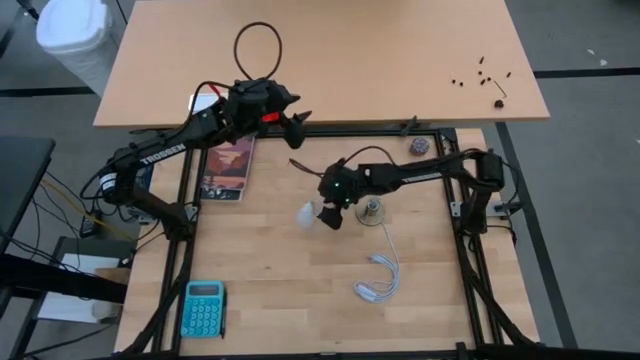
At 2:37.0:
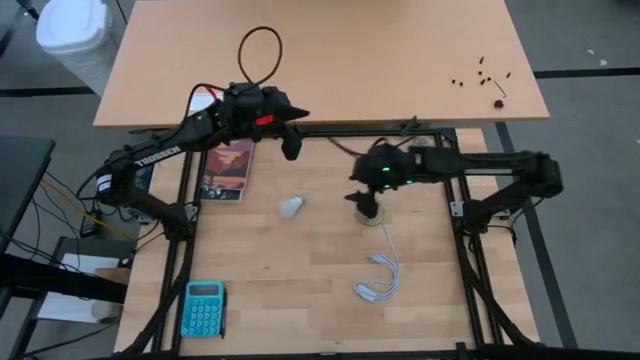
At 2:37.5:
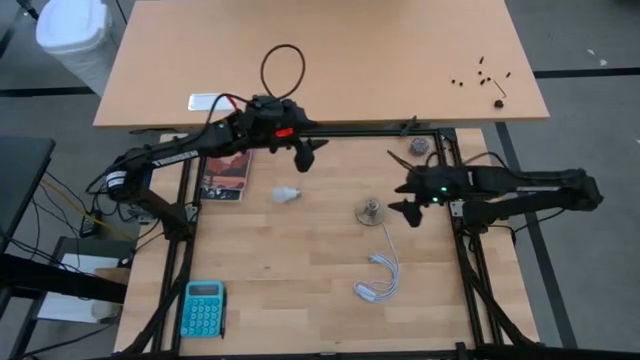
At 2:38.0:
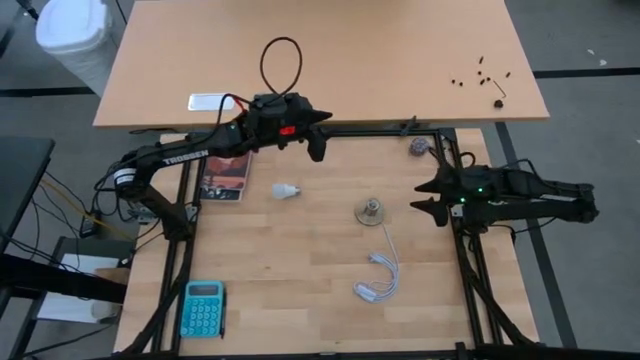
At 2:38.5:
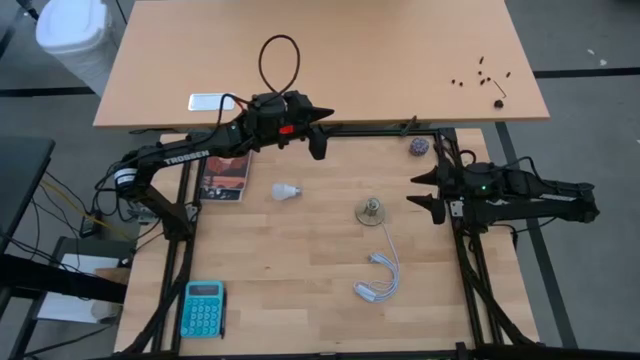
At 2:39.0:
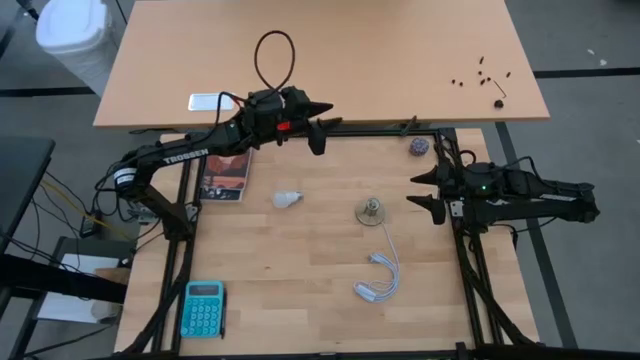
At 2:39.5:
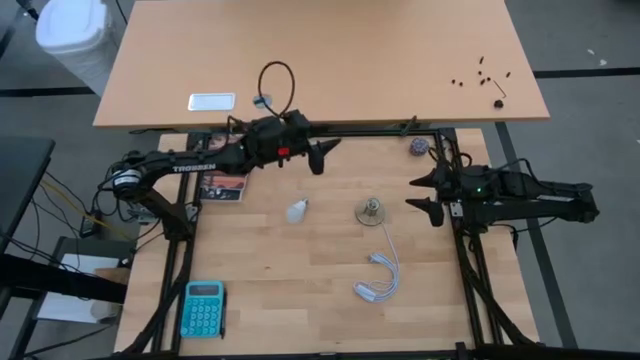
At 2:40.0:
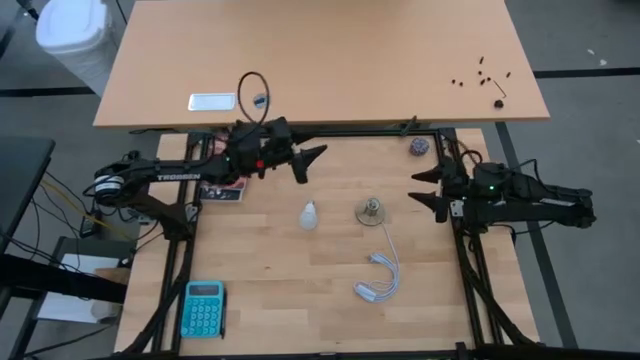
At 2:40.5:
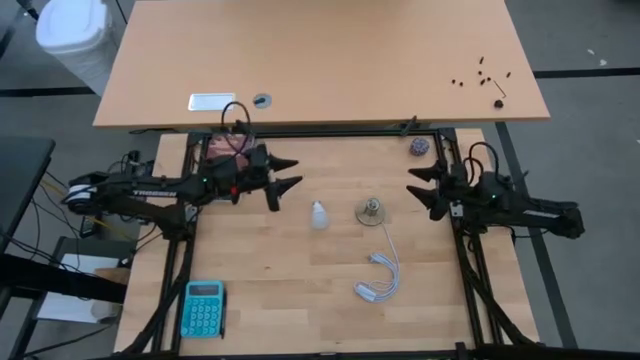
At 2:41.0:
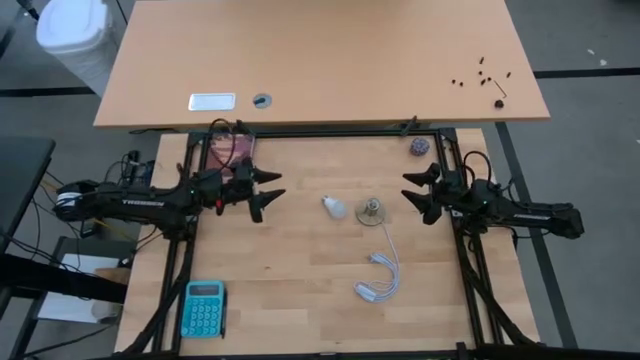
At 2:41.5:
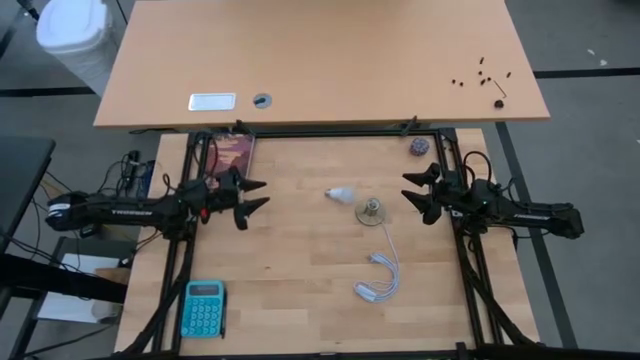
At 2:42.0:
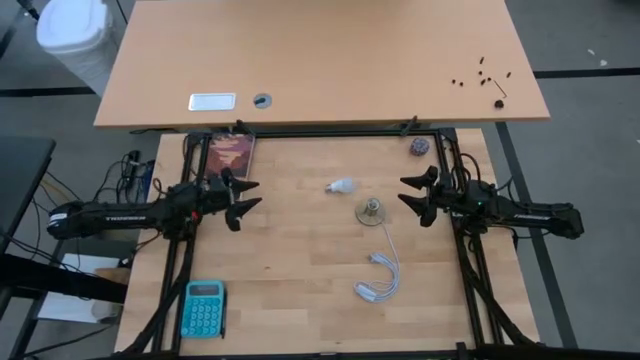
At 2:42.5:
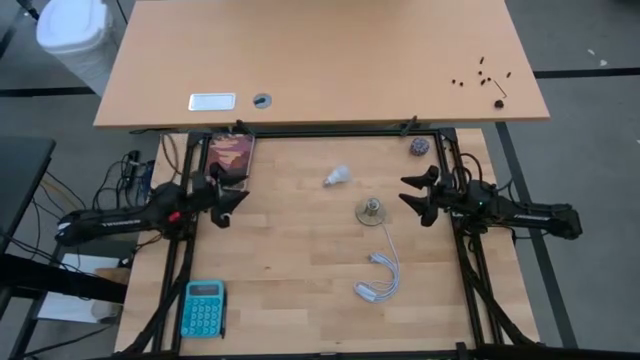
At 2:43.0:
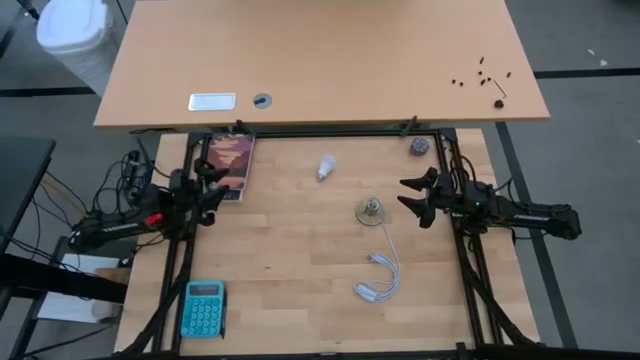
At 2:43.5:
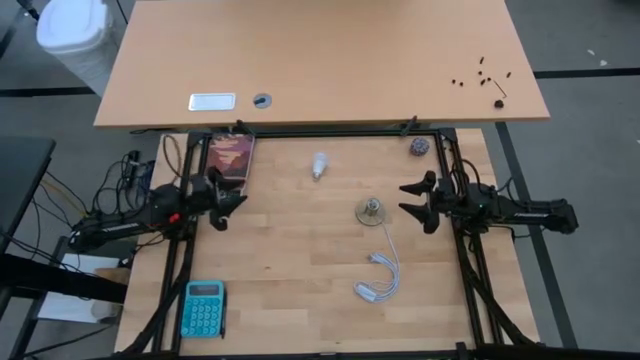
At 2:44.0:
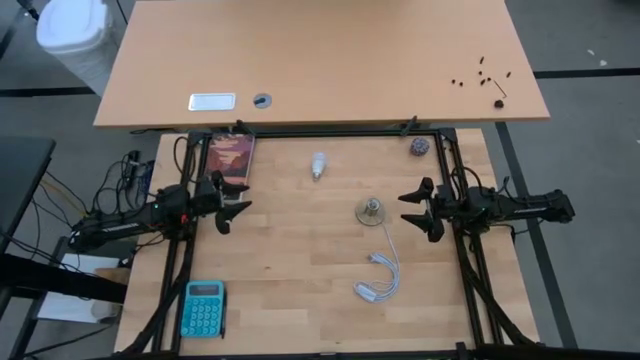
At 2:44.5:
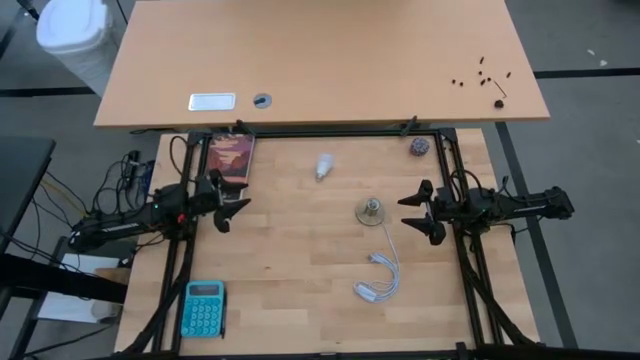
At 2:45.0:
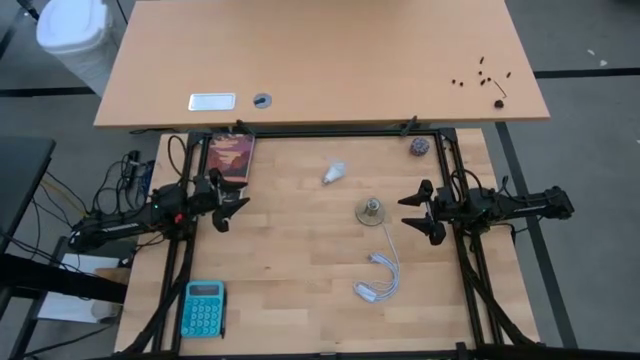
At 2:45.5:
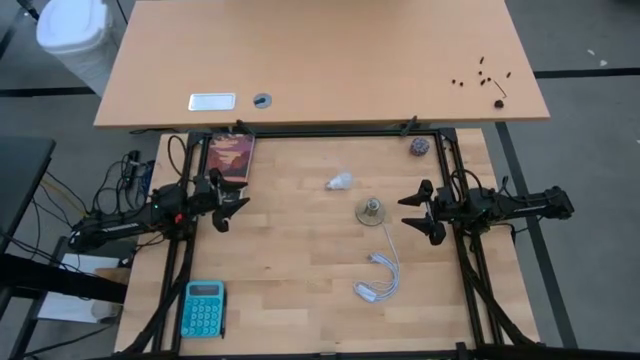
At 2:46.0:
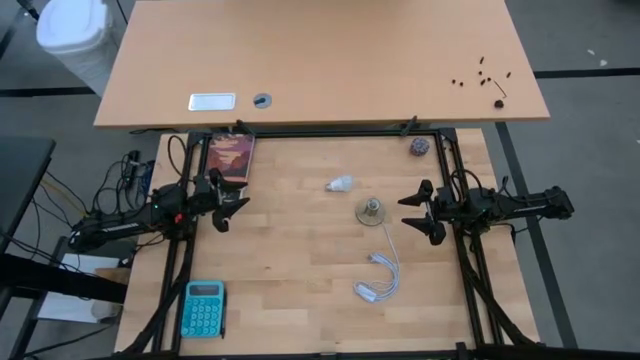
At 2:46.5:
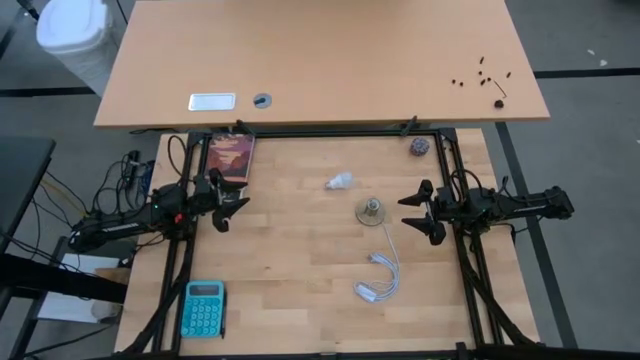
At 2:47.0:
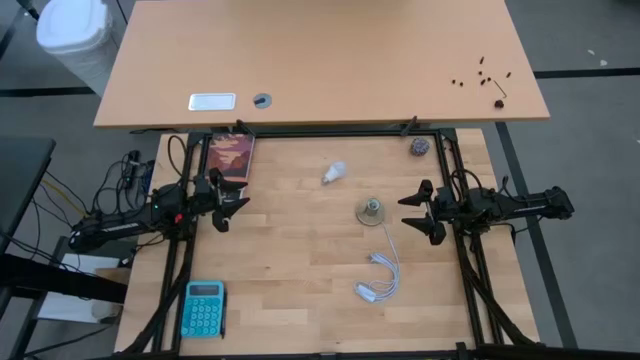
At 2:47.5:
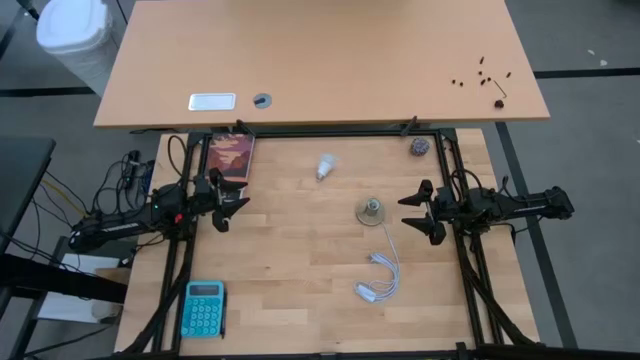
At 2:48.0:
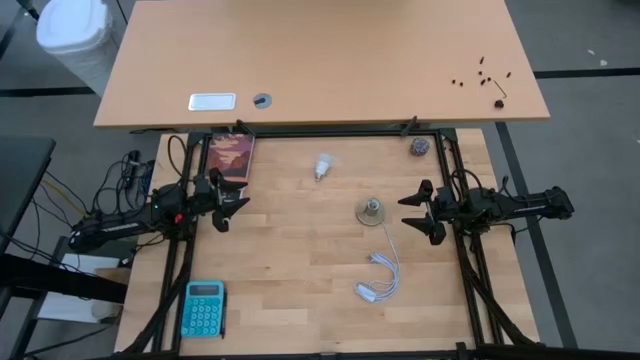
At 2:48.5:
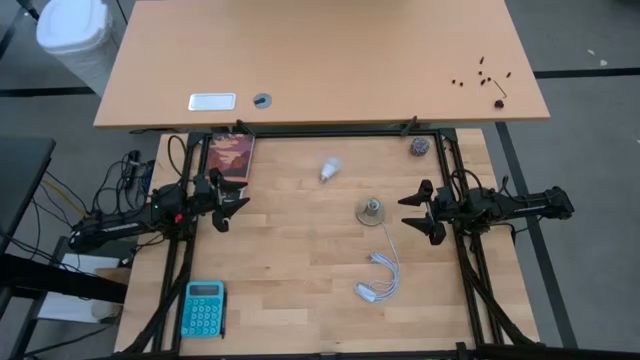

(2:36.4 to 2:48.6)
Task: Screw lightbulb
Return to Home Position

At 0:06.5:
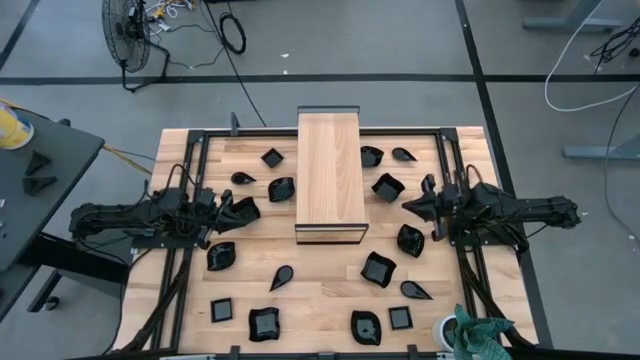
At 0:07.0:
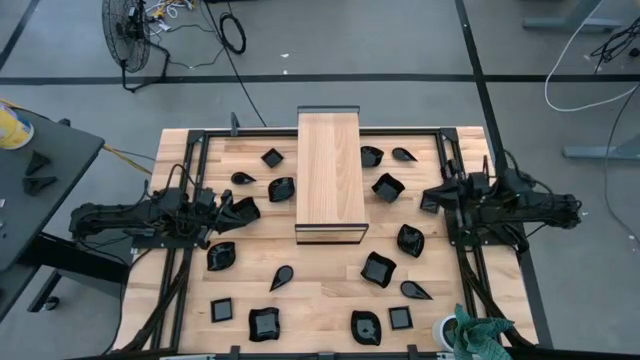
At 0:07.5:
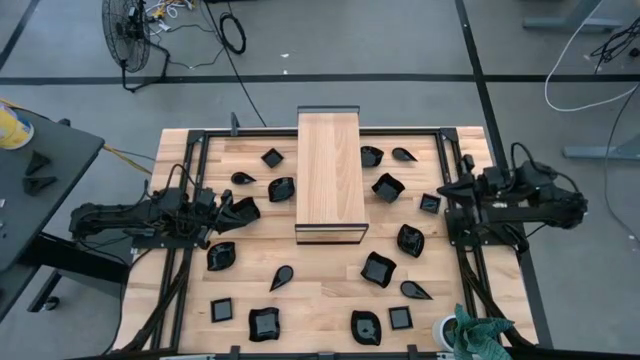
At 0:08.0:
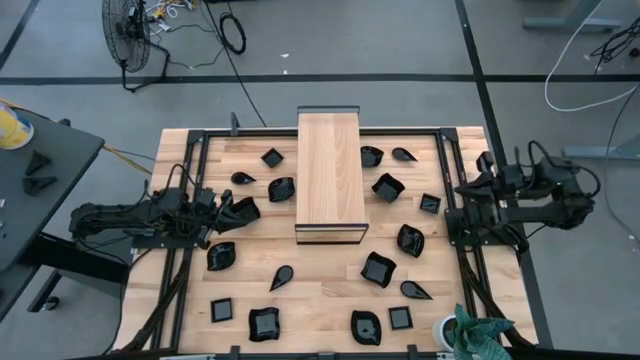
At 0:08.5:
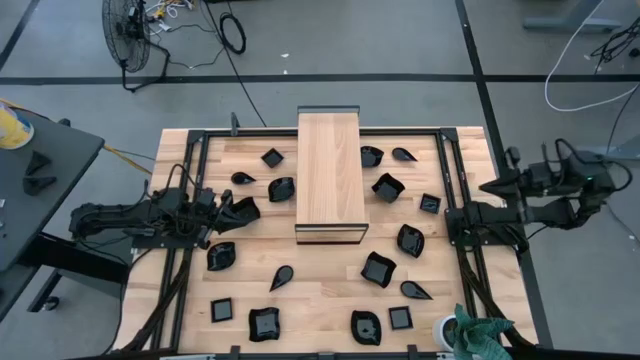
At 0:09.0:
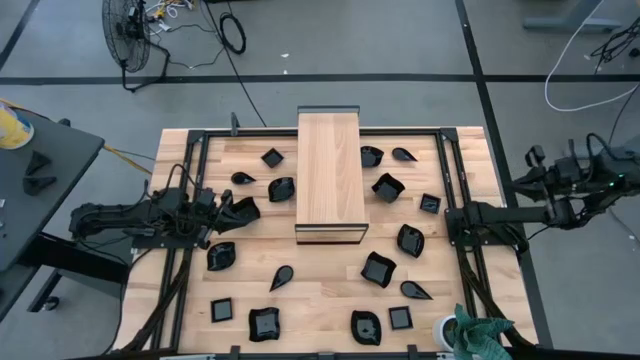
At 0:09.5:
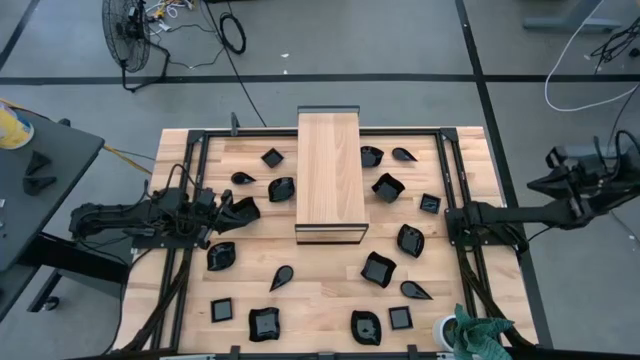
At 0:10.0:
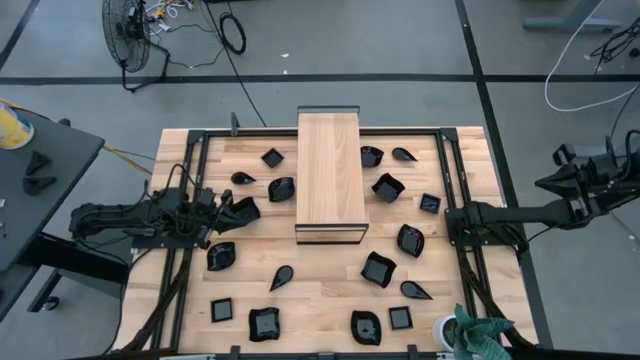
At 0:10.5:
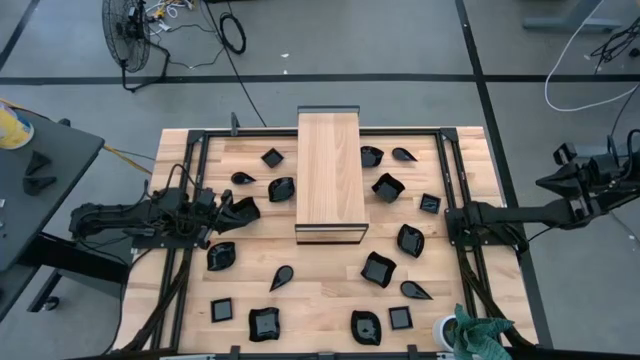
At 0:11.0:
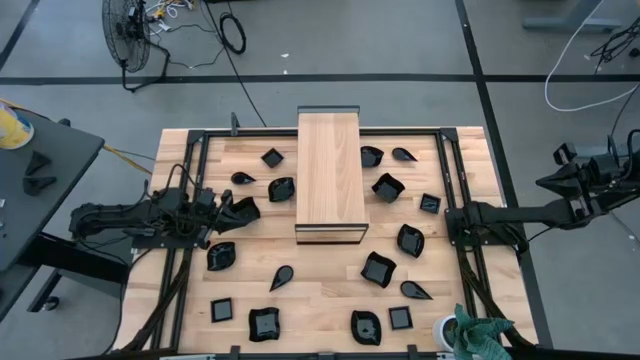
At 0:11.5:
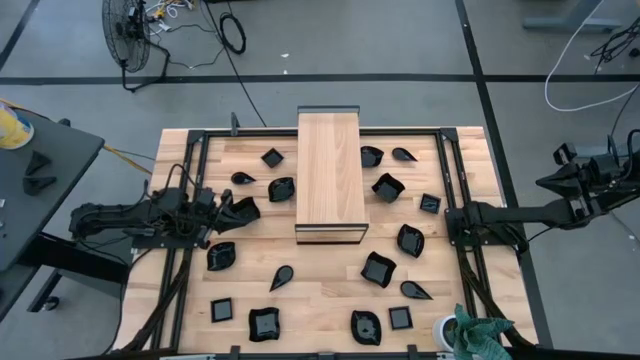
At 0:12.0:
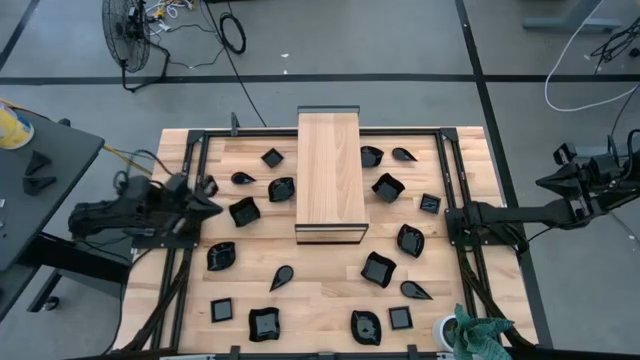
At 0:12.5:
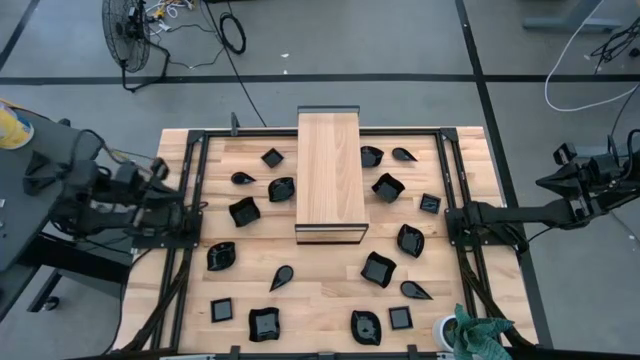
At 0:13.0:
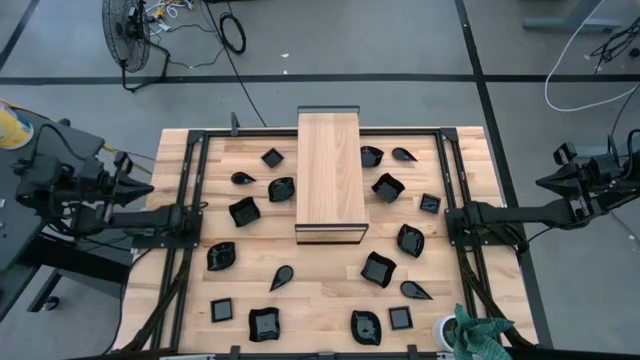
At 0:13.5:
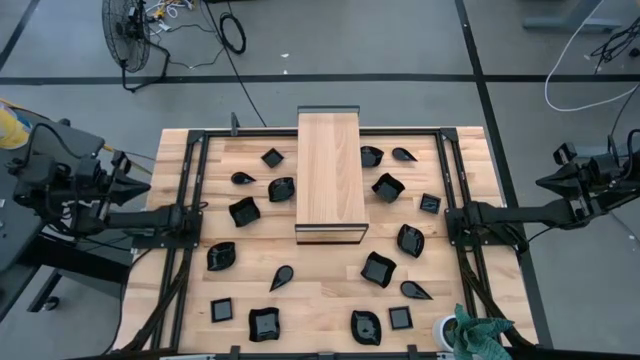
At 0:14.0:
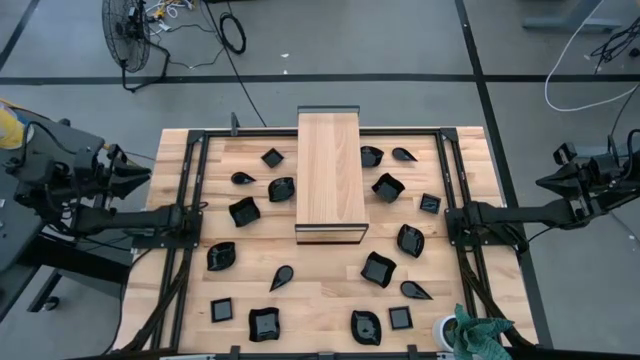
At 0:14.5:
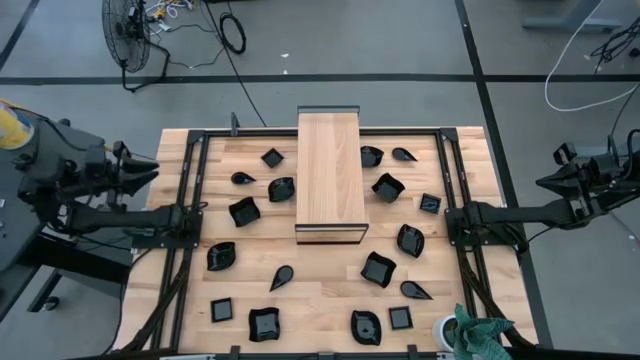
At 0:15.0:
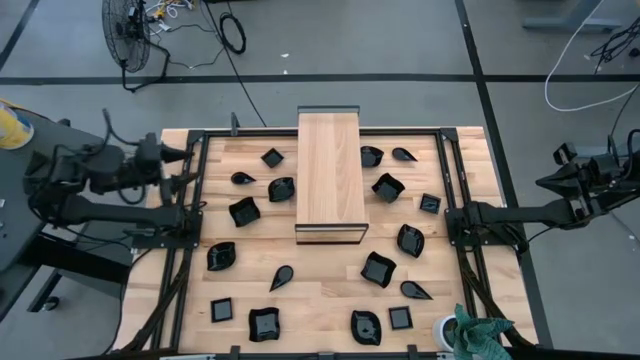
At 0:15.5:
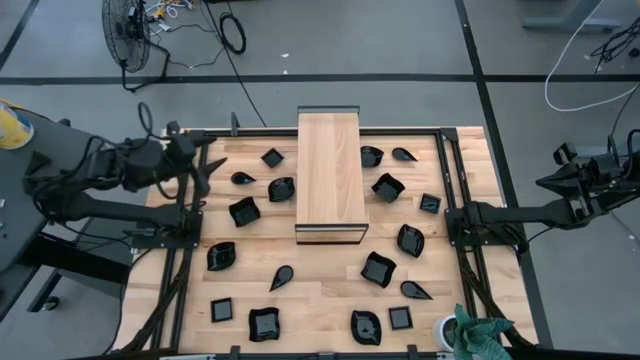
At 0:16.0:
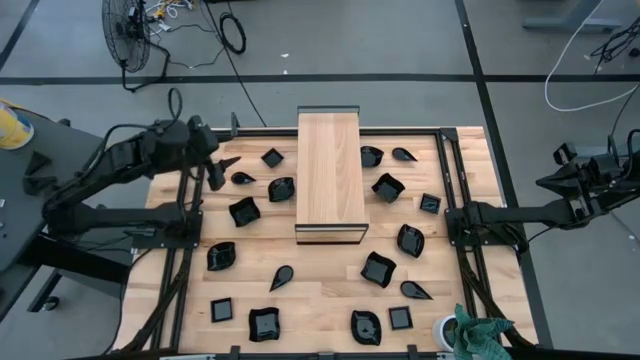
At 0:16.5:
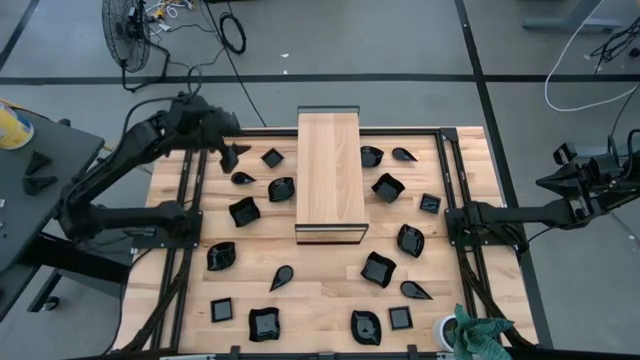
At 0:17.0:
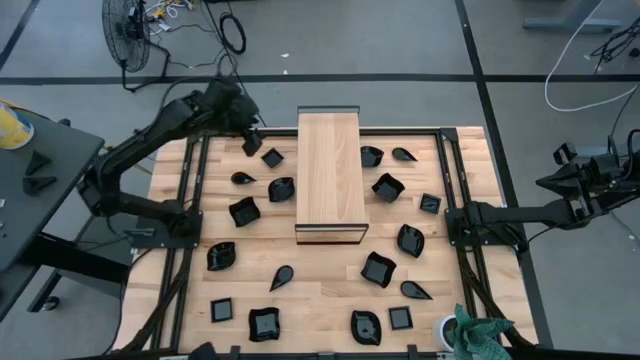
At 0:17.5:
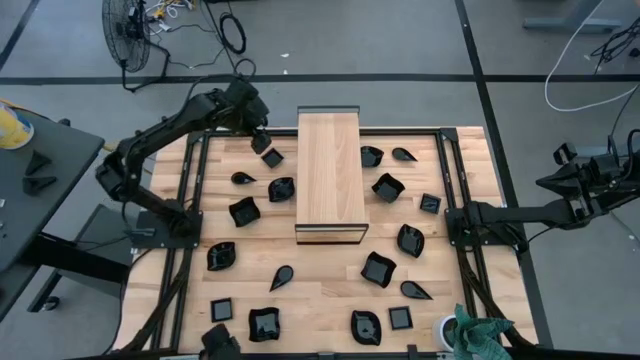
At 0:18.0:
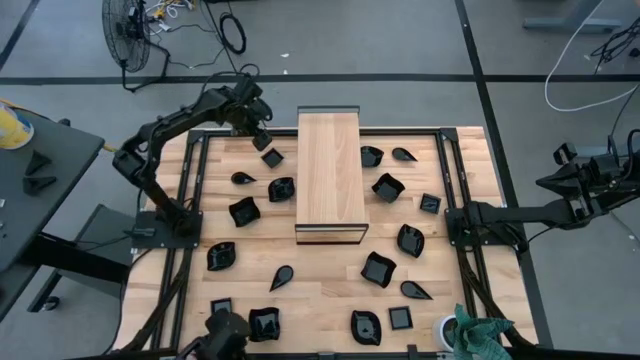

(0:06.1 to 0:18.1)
Task: Pick & Place Mini shaped plates
Put the square plate on the shelf
